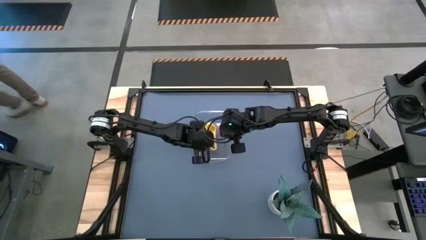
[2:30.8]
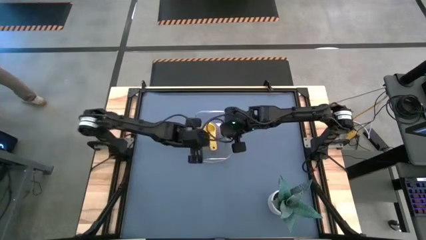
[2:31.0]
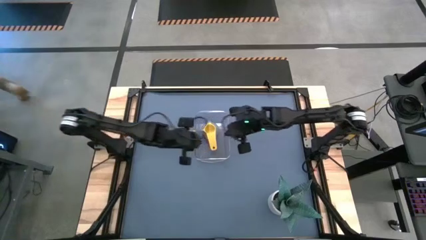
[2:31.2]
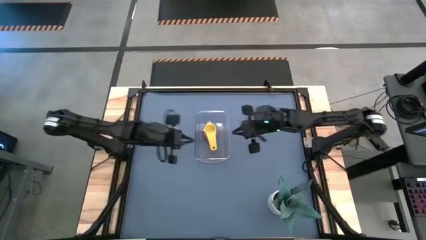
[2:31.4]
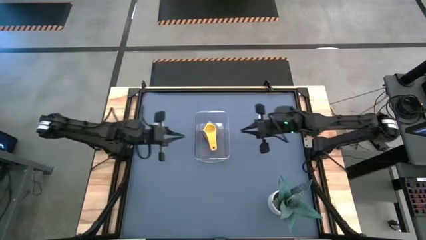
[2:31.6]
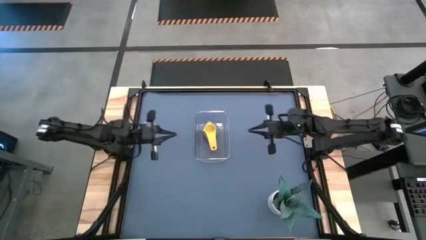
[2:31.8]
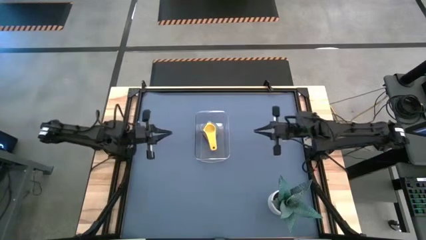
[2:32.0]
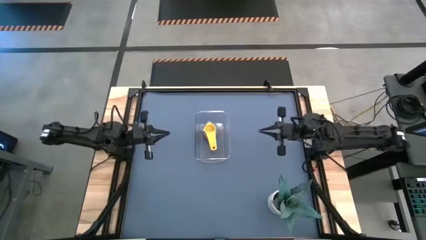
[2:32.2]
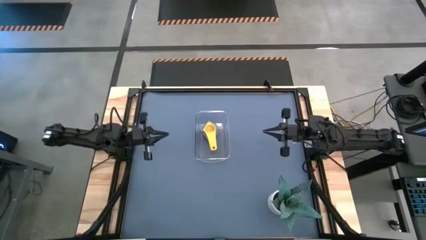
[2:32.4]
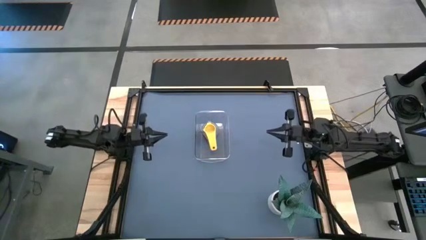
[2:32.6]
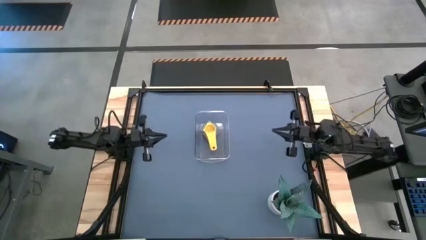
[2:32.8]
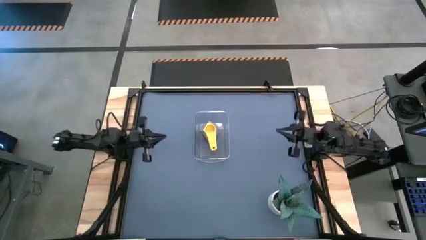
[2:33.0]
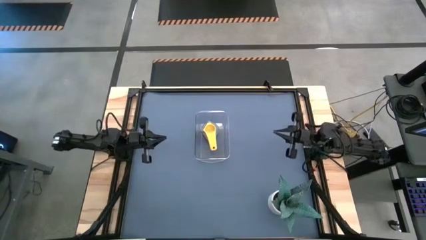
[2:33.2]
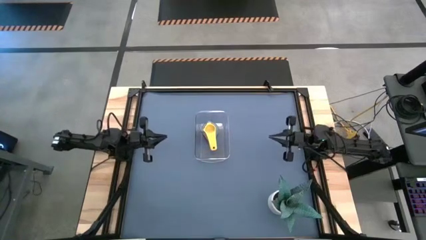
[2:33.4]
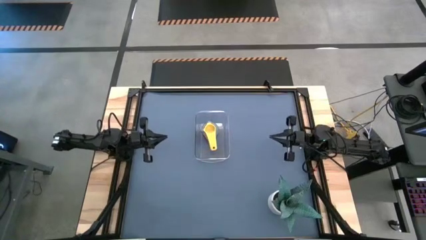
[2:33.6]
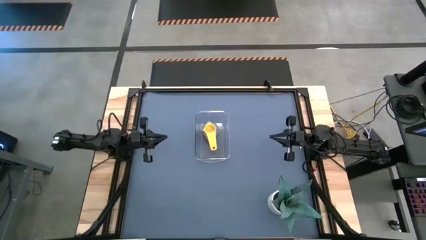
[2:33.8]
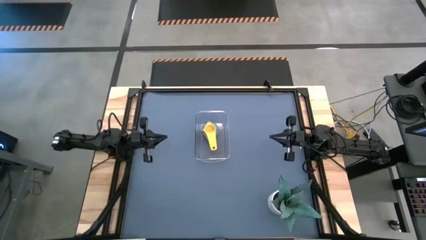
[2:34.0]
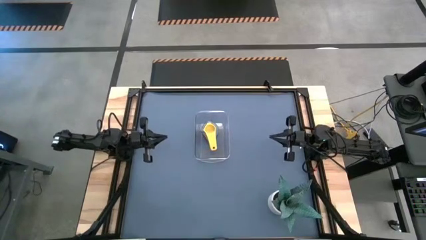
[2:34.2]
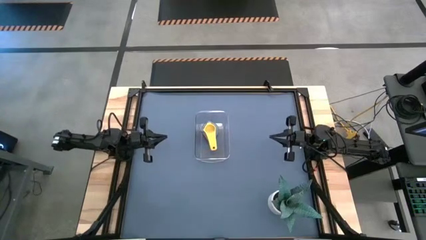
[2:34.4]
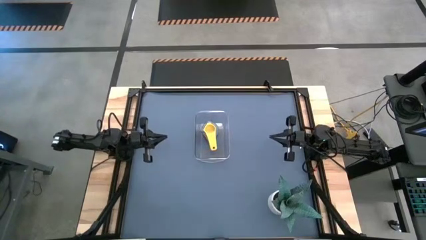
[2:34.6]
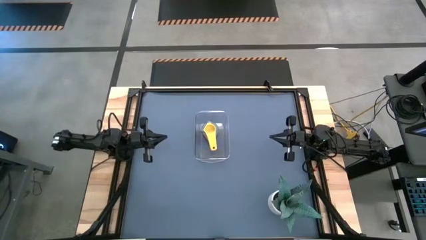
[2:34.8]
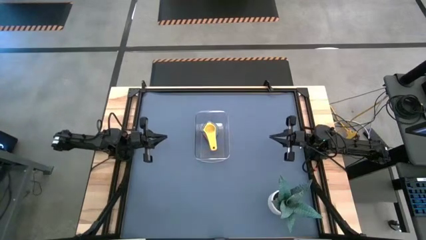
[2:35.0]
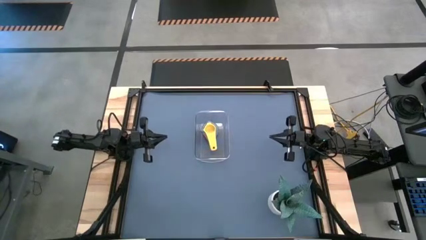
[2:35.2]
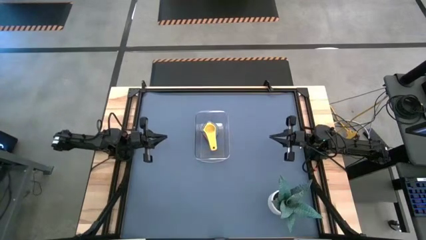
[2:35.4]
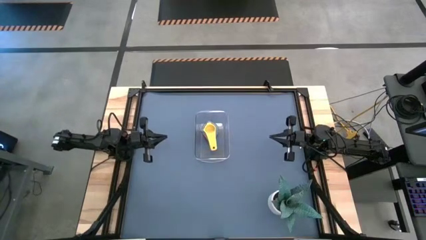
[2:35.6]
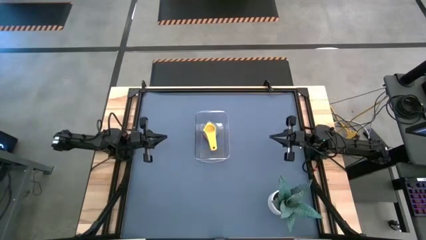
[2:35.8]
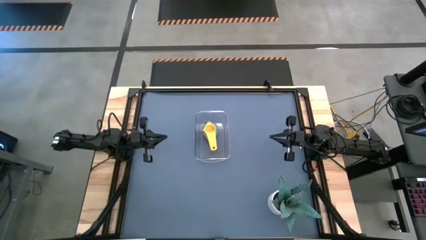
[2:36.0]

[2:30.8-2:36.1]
Task: Nest measuring cups in basket
Return to Home Position

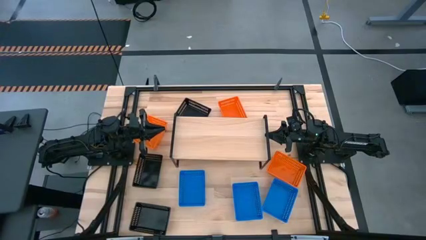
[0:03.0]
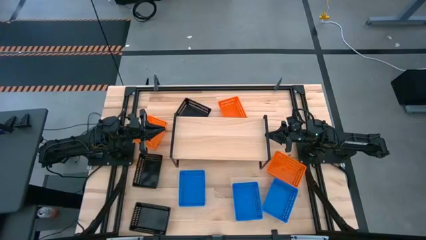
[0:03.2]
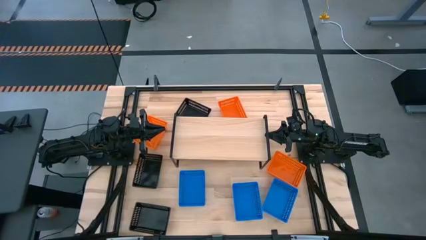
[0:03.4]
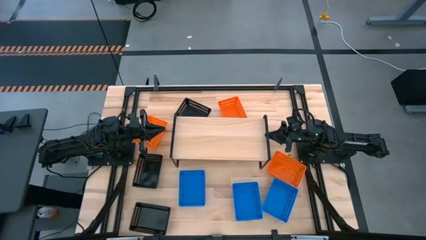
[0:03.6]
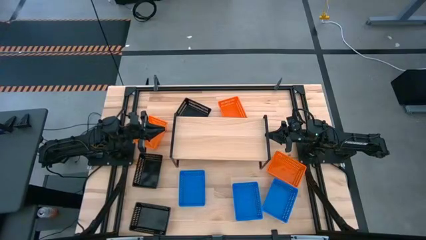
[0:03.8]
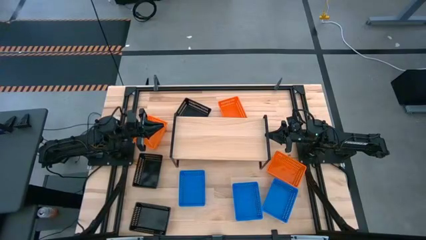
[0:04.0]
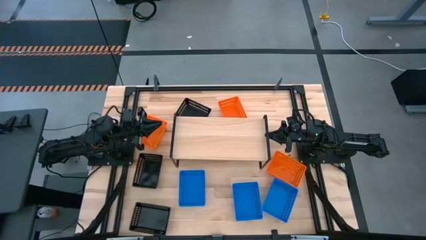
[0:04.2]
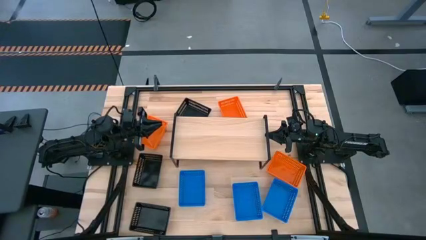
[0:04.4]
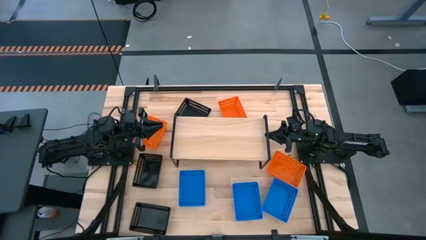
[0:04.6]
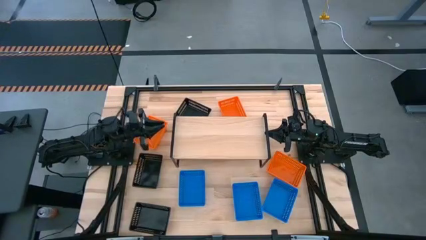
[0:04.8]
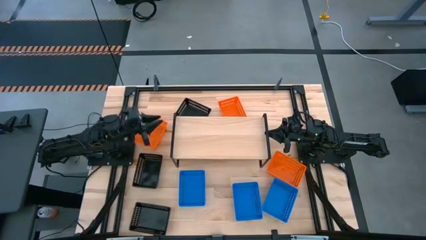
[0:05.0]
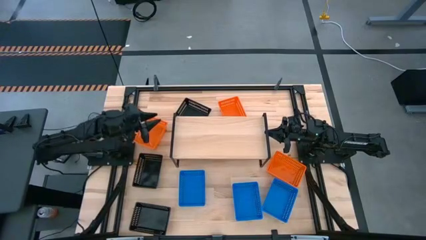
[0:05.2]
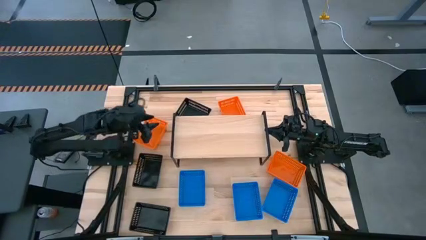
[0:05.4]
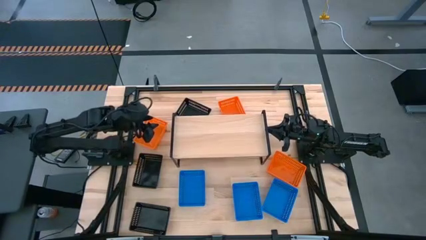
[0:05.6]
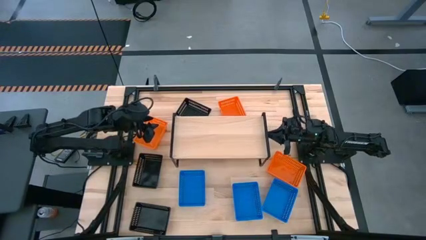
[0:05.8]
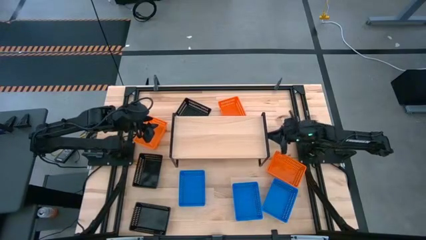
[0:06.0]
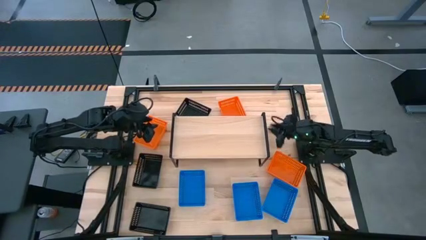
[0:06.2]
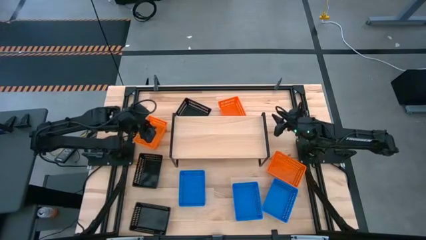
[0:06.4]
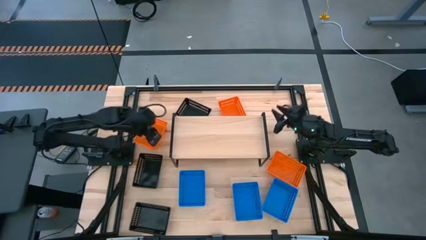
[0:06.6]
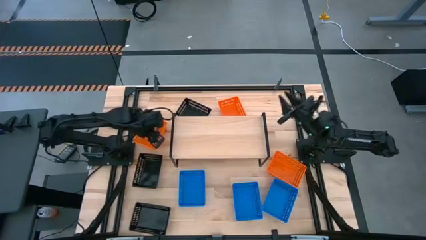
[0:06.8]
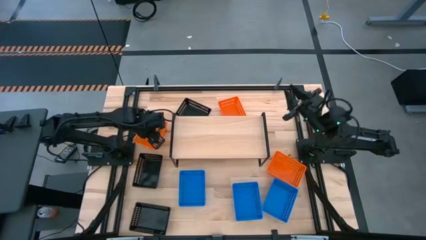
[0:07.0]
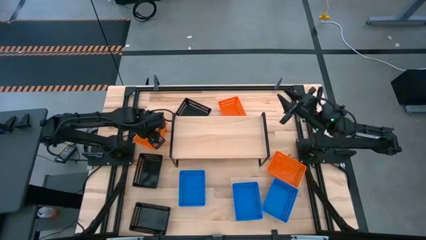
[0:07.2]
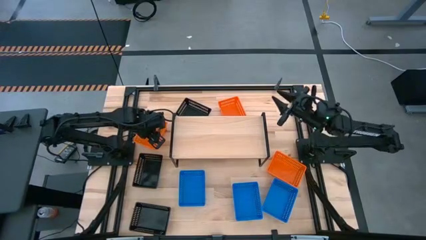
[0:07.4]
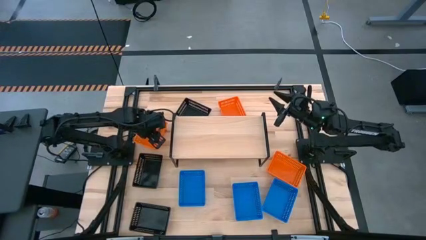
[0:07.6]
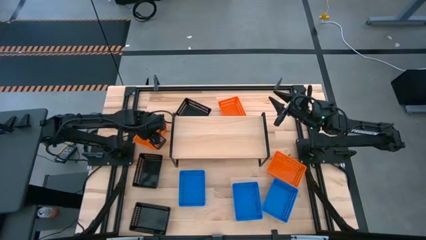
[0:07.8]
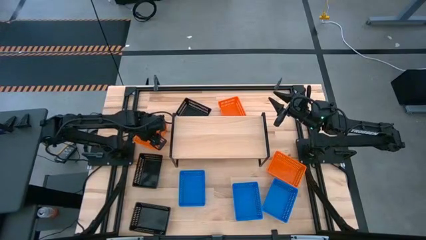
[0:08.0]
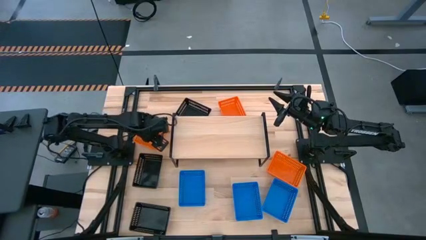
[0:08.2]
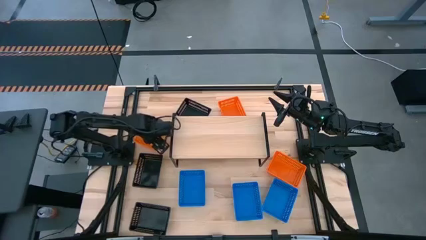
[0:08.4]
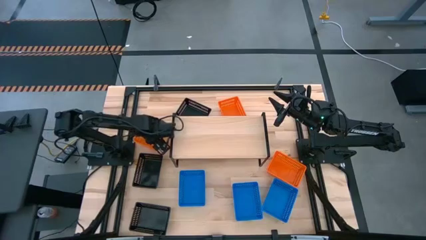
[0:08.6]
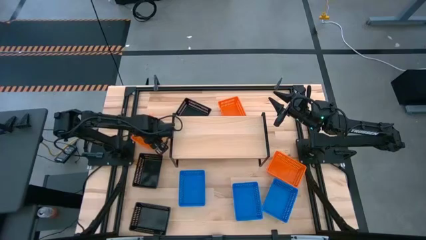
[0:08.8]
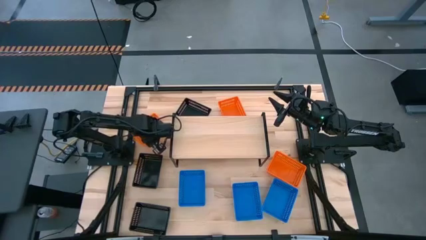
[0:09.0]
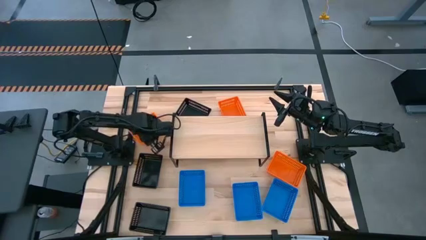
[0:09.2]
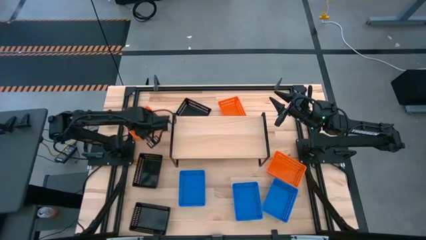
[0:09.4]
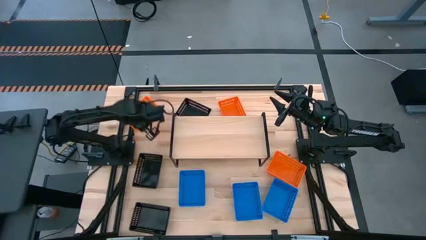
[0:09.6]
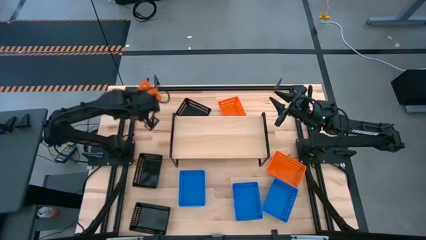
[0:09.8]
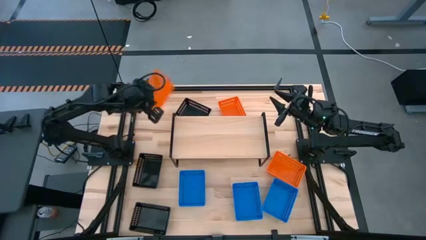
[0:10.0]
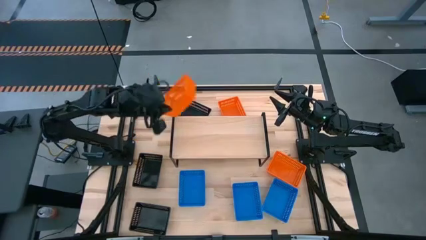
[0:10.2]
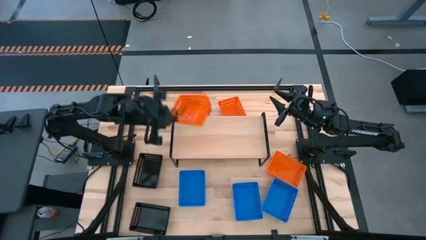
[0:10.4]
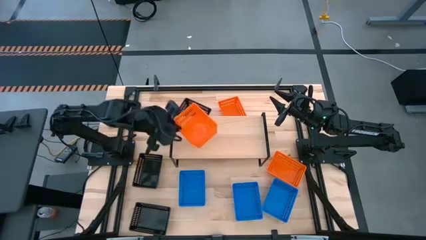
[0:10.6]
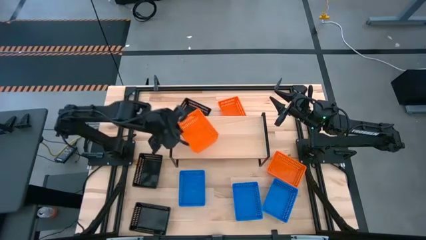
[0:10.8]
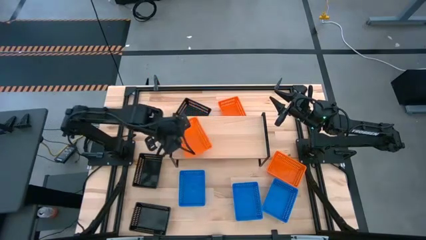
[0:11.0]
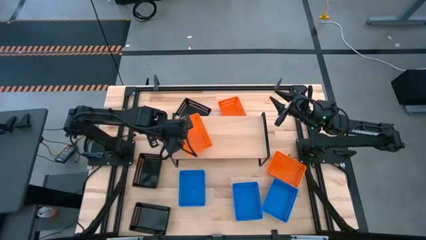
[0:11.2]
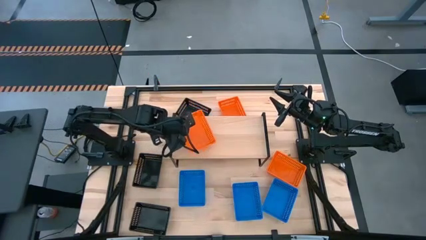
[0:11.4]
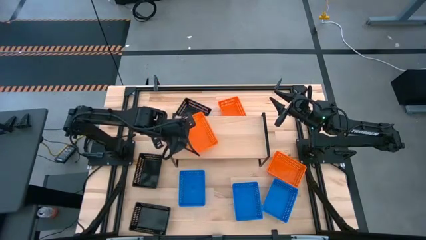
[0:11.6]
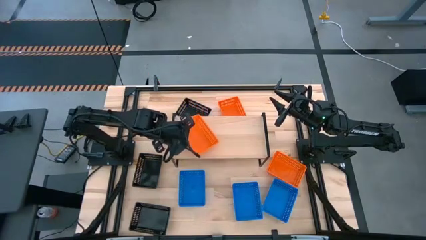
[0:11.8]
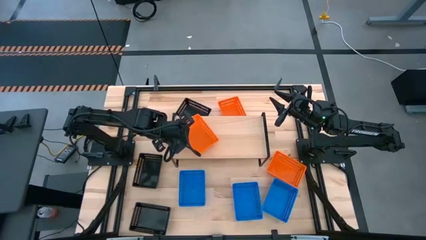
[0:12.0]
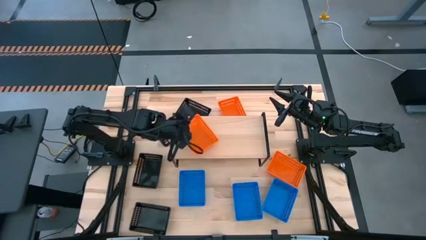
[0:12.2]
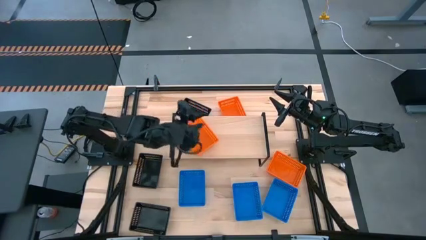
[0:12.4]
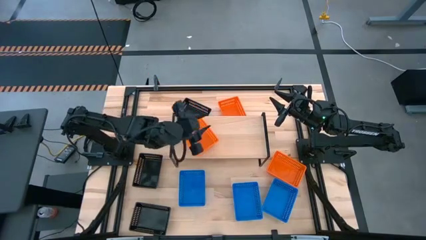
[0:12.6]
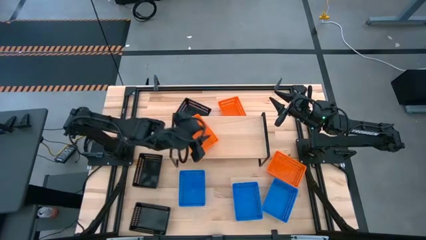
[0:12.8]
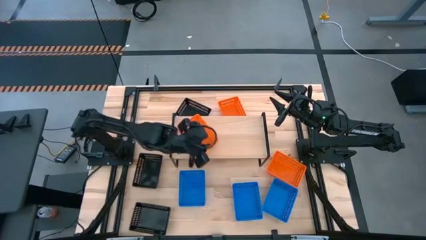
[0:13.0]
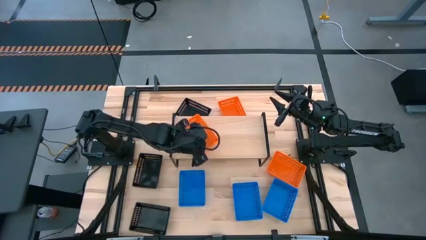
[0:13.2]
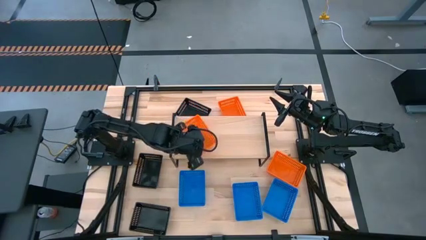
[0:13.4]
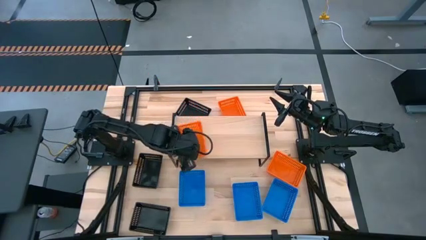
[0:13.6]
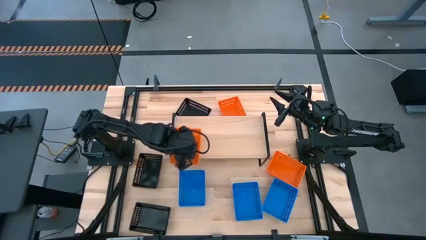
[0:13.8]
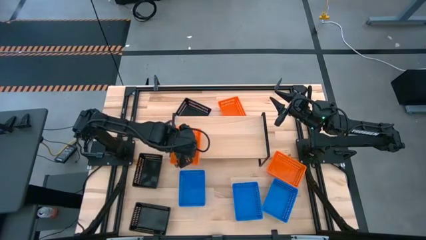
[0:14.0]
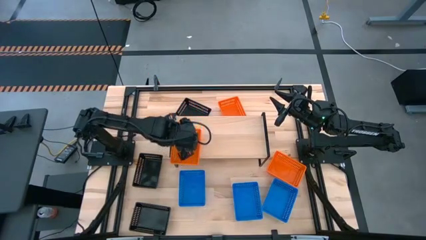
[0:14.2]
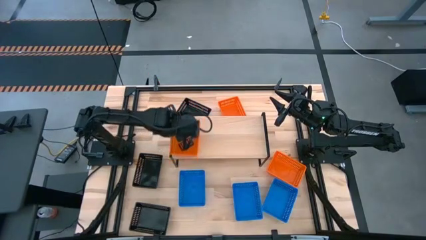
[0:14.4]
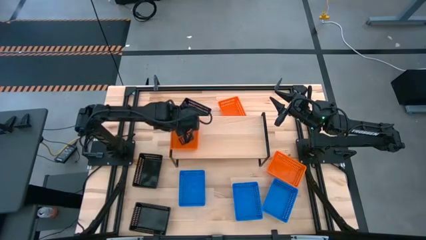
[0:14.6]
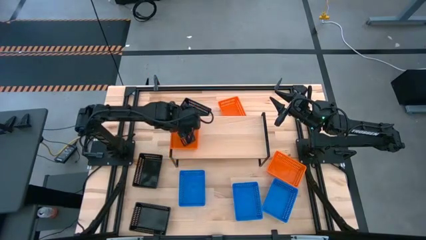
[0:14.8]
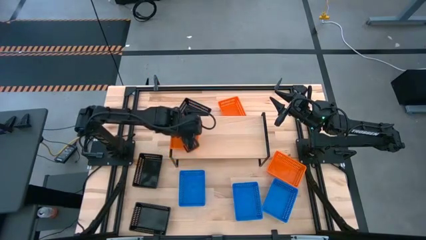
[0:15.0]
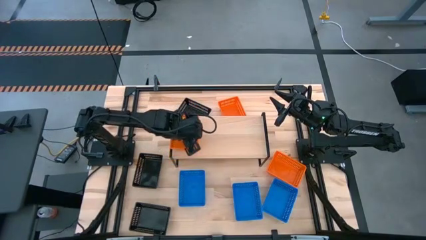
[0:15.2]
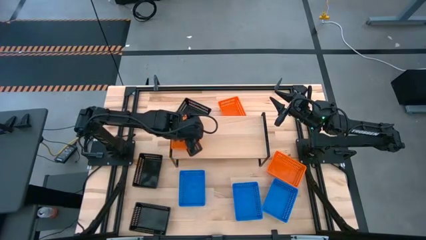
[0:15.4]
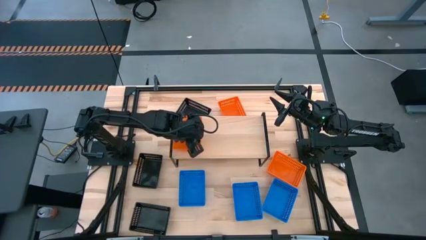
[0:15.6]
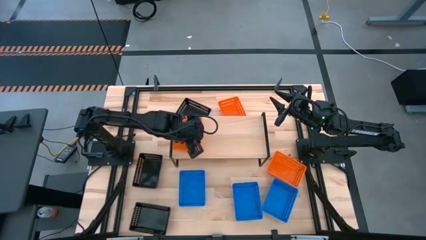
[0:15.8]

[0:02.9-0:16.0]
Task: Stack baskets on shelf by color
Put the top left orange bin on the shelf
